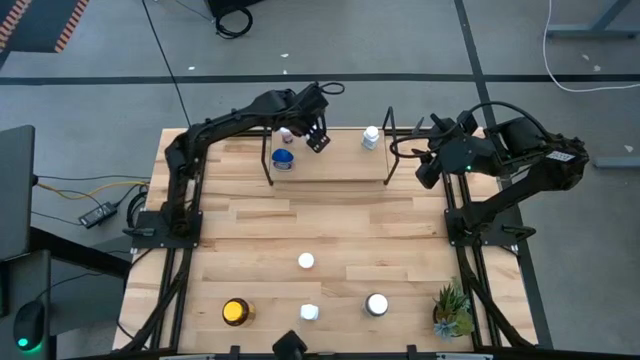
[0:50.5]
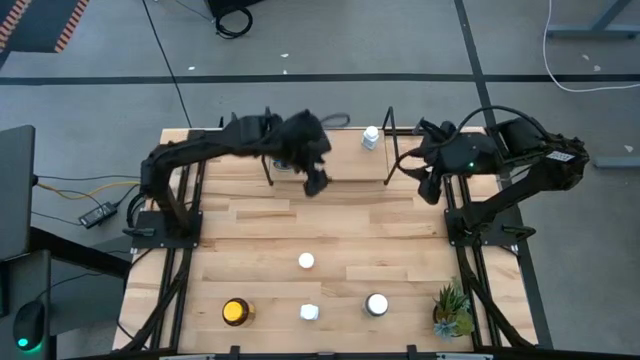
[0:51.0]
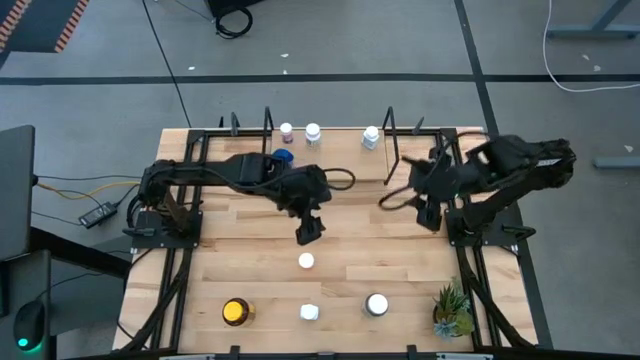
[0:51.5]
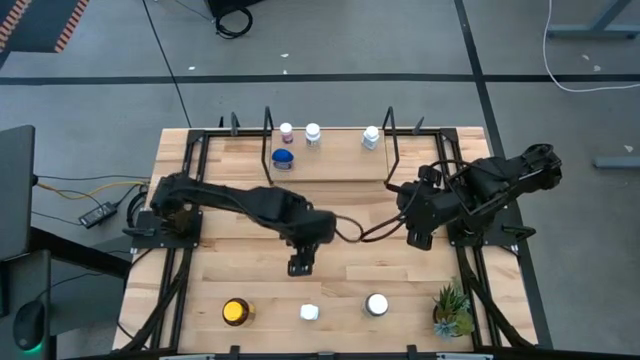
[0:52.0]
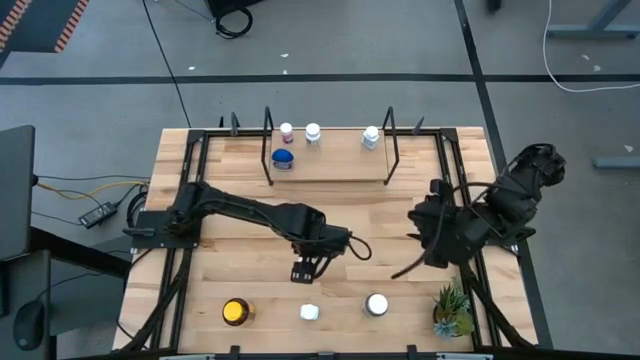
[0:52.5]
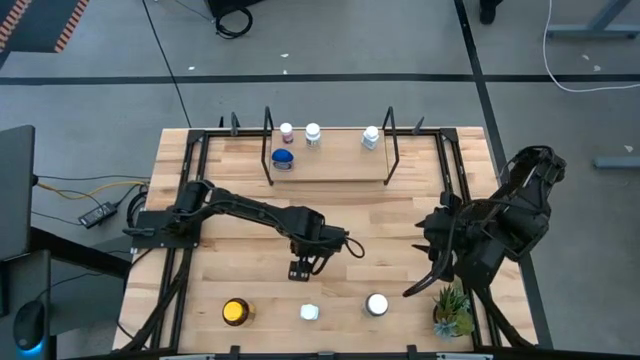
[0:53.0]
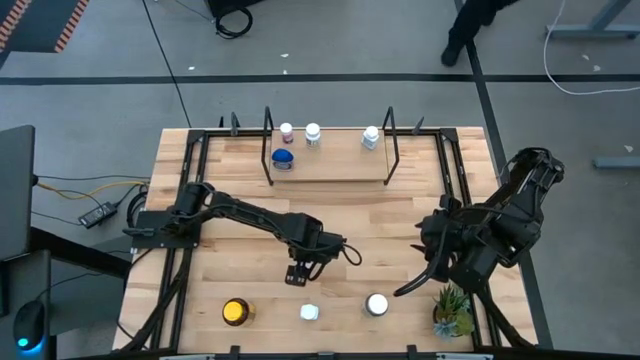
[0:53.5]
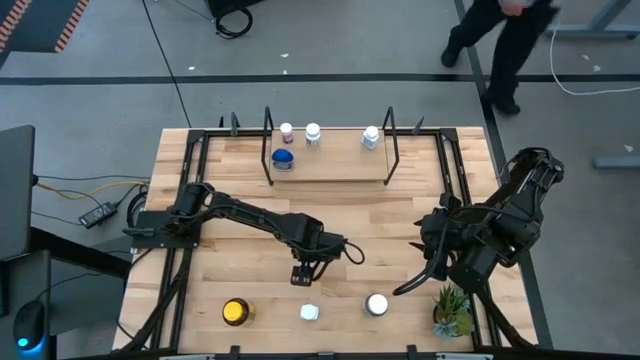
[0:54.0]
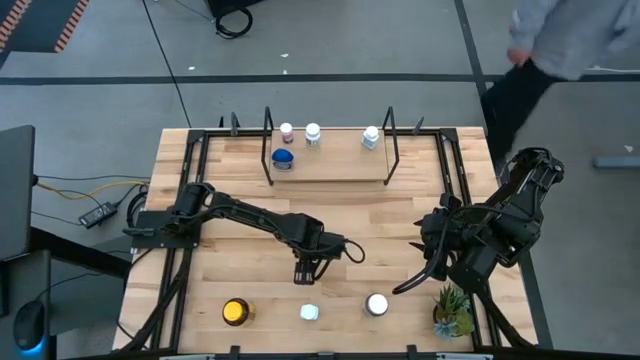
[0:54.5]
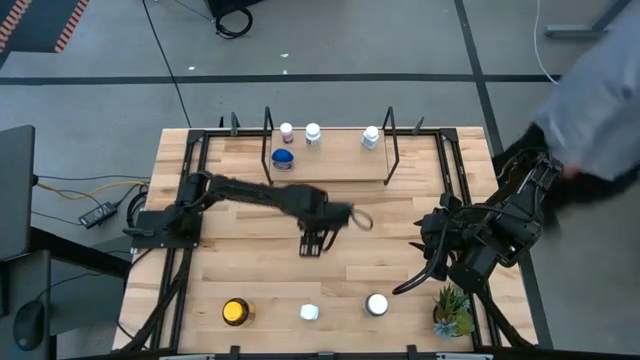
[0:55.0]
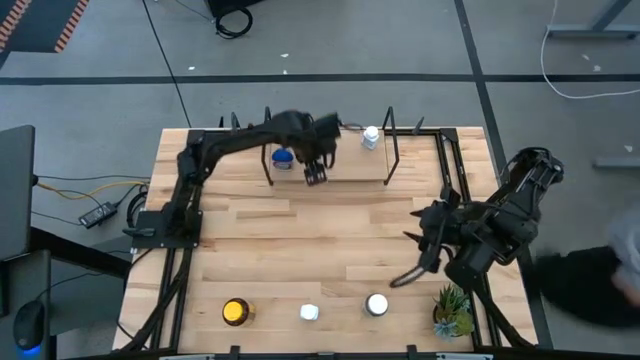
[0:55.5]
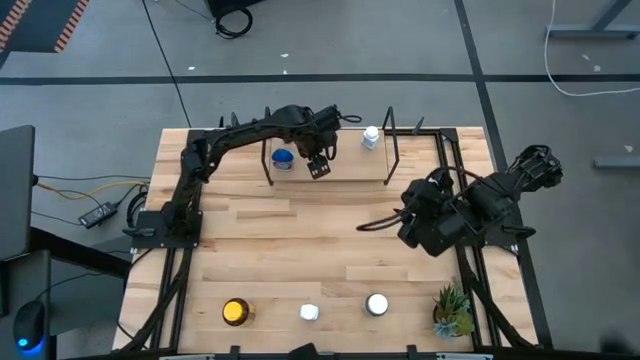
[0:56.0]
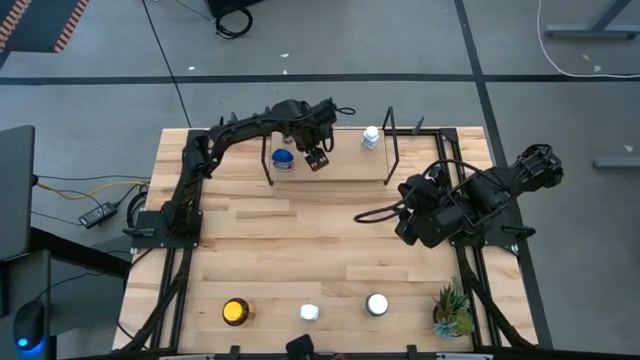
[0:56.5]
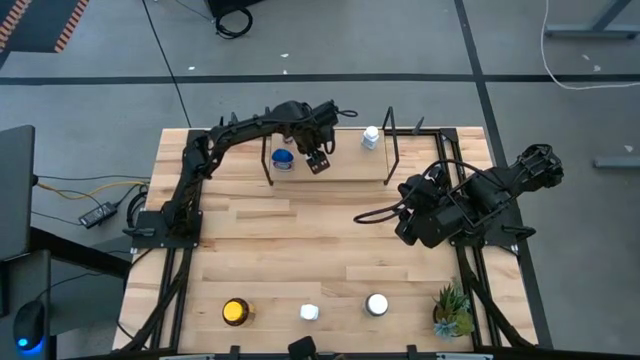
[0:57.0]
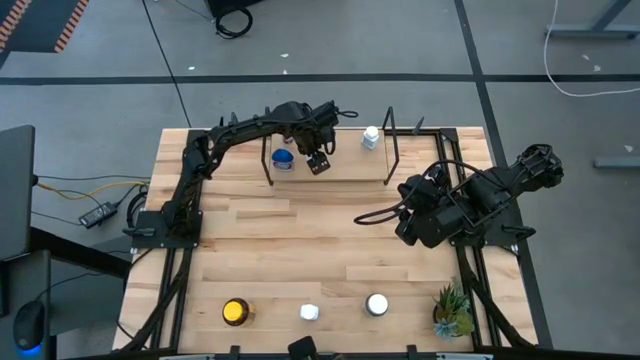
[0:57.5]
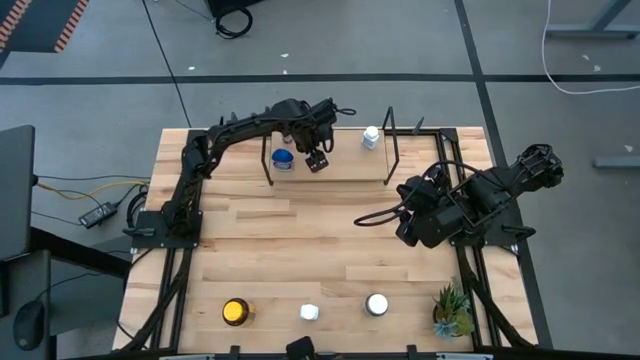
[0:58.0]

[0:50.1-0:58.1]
Task: Pick and place medicine bottles onto shelf by color
Put the orange pill bottle on the shelf

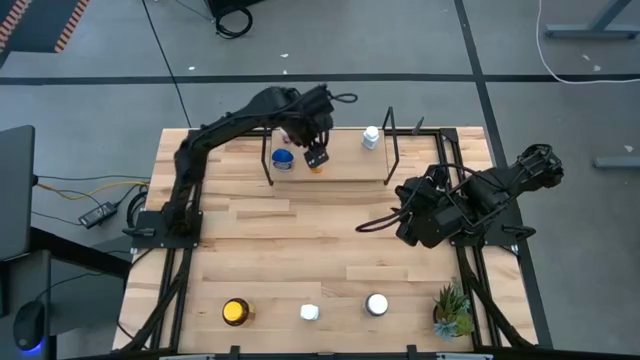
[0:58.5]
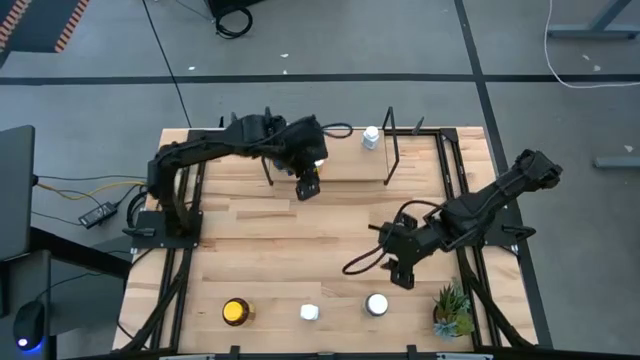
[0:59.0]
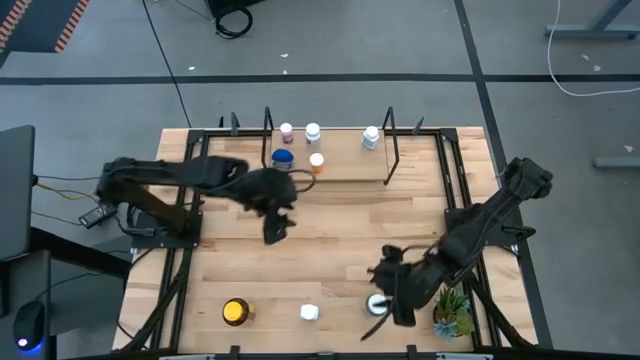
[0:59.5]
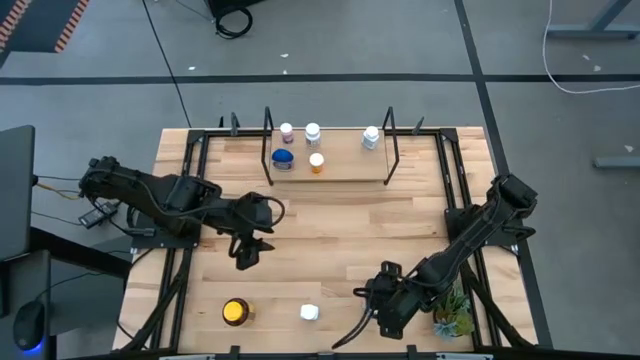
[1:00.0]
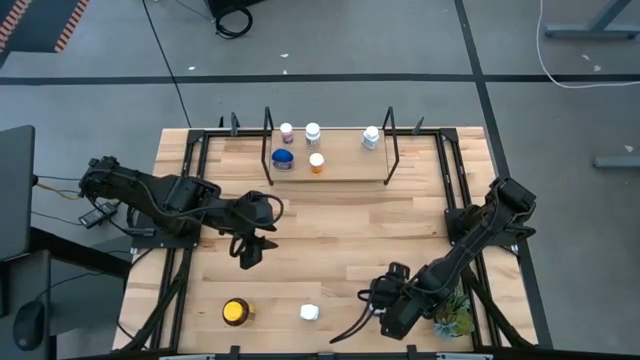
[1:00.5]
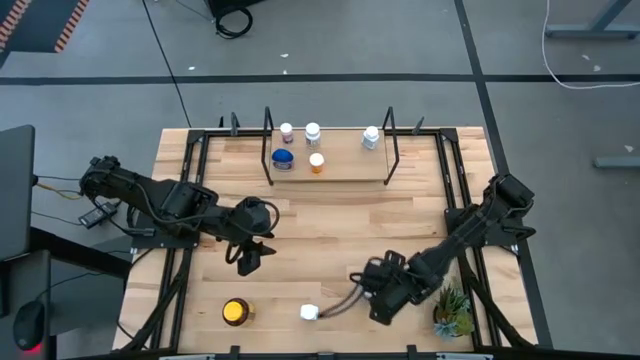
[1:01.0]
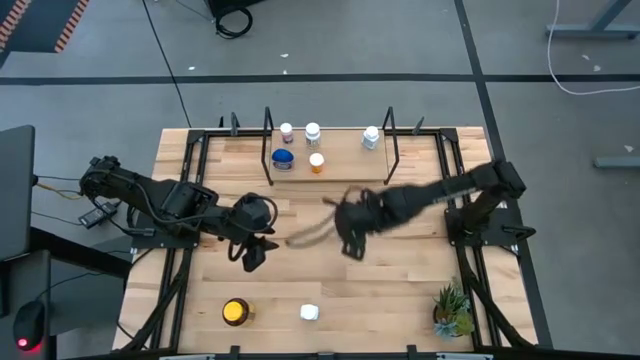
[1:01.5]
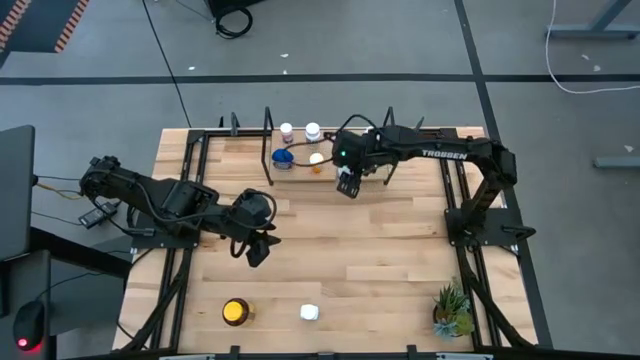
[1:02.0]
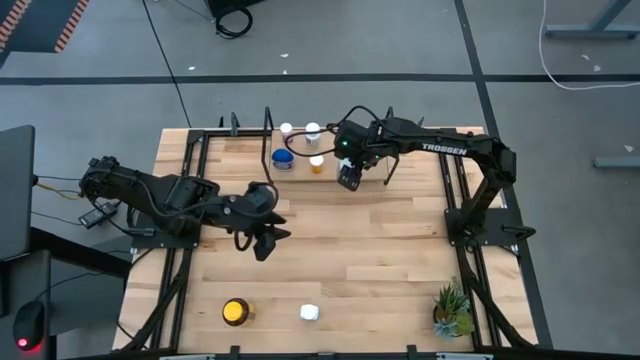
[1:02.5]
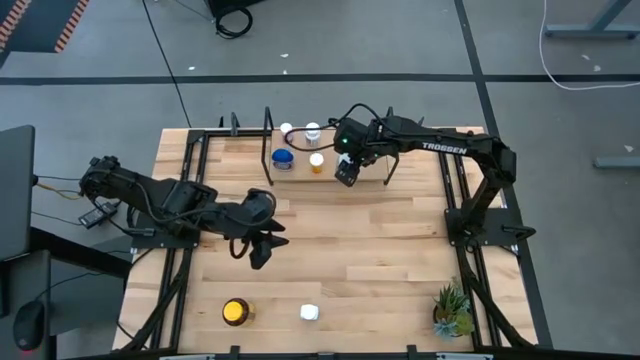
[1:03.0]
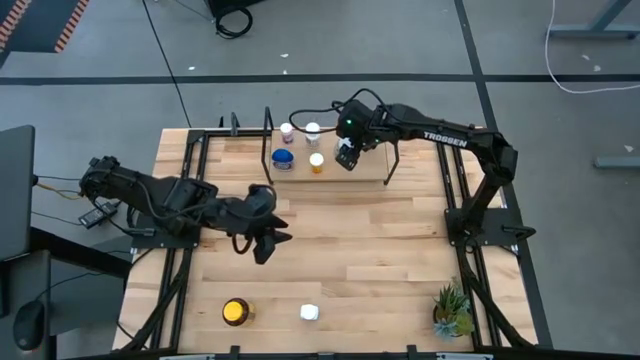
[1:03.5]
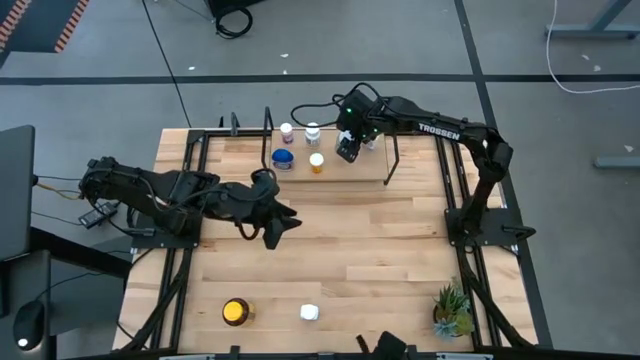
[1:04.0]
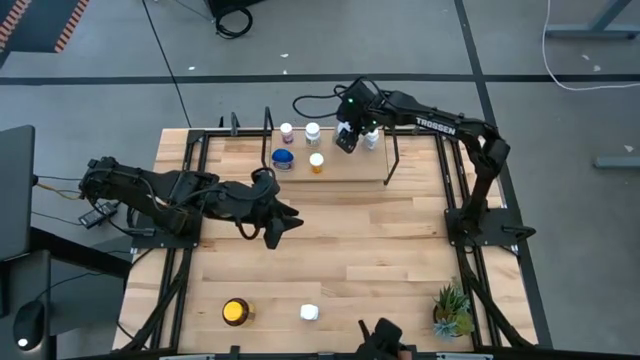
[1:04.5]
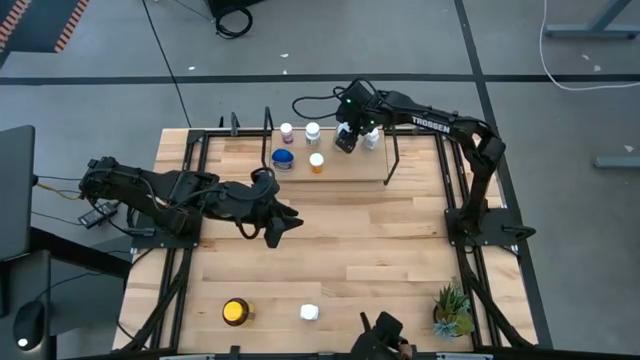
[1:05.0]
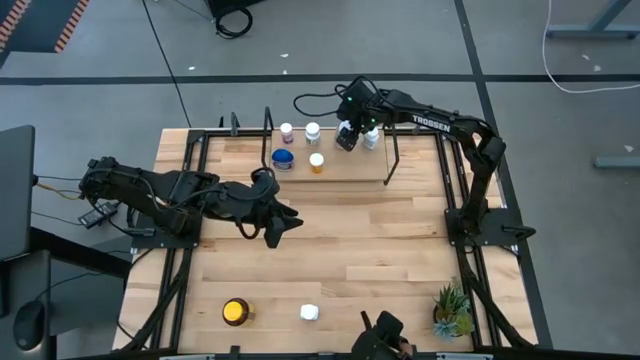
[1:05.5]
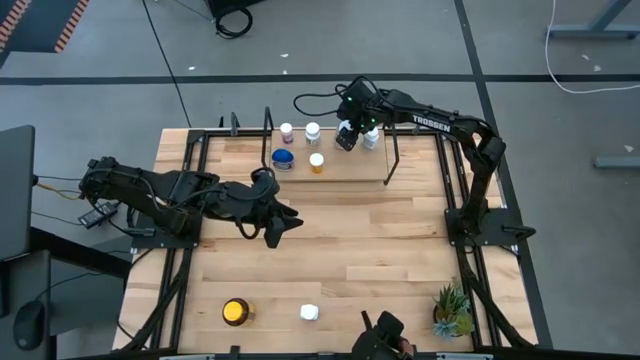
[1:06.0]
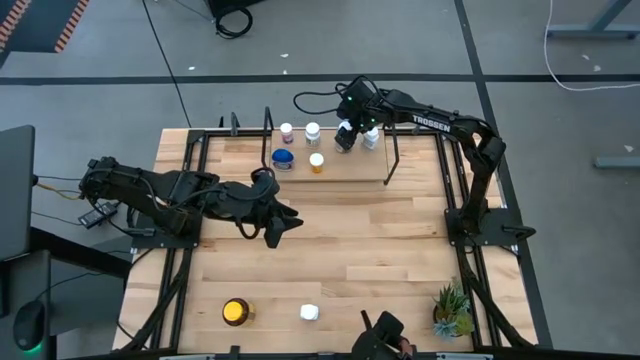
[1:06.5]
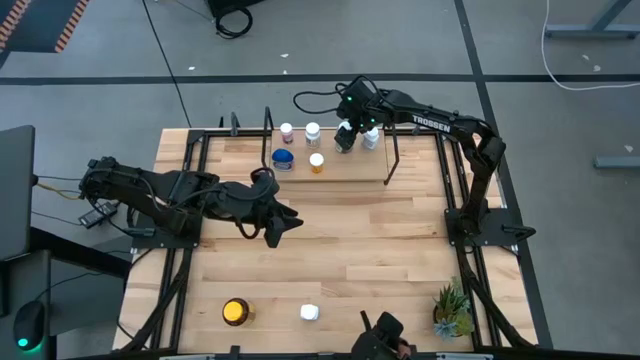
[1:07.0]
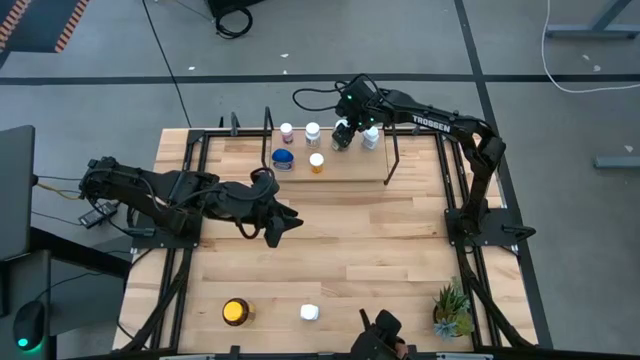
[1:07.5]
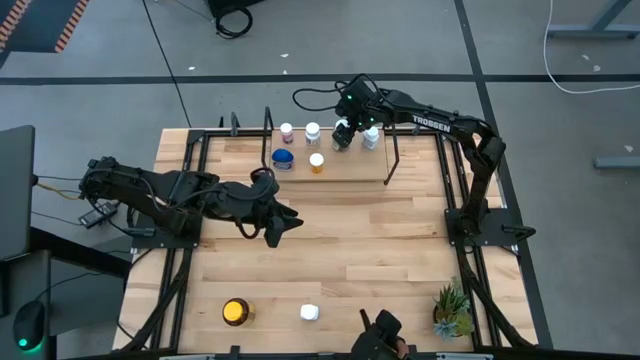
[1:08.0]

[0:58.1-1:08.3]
Put the green pill bottle on the shelf

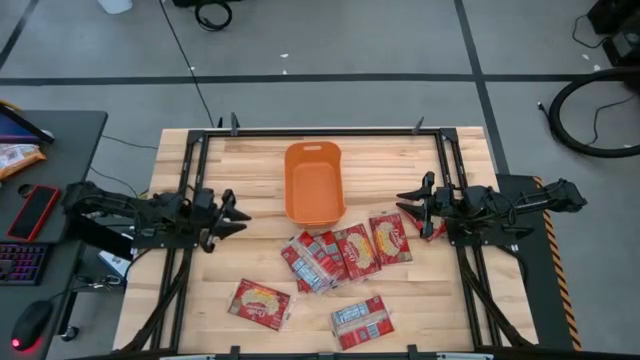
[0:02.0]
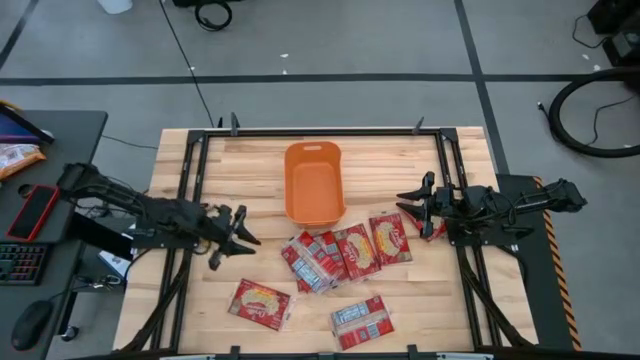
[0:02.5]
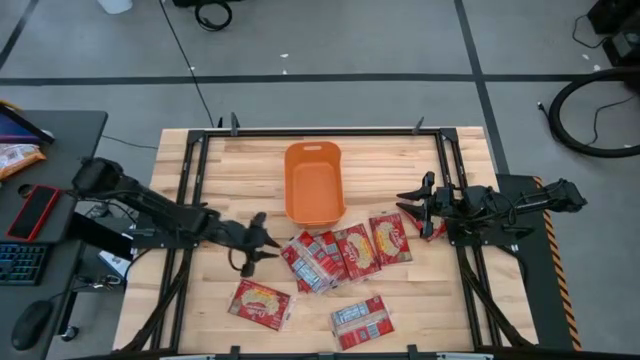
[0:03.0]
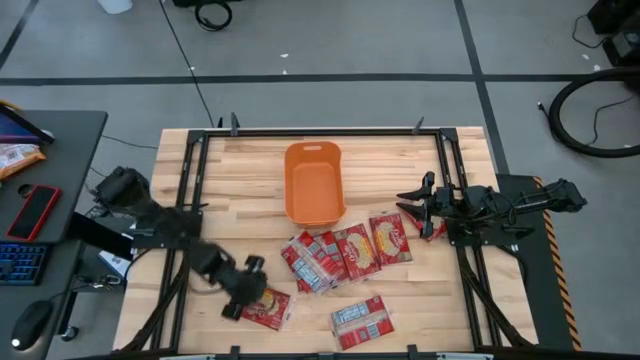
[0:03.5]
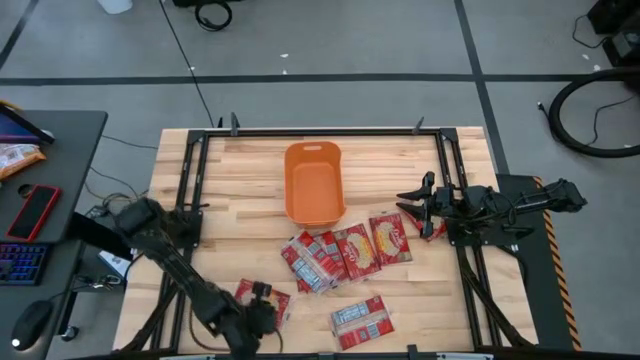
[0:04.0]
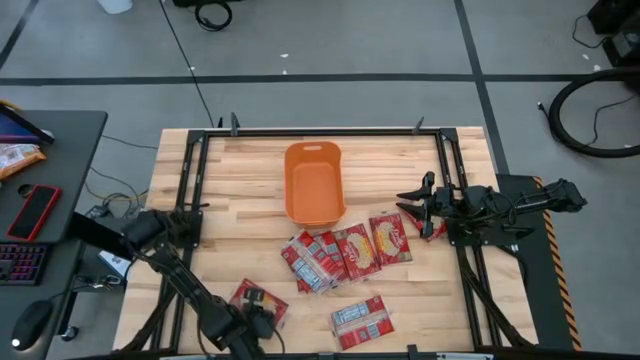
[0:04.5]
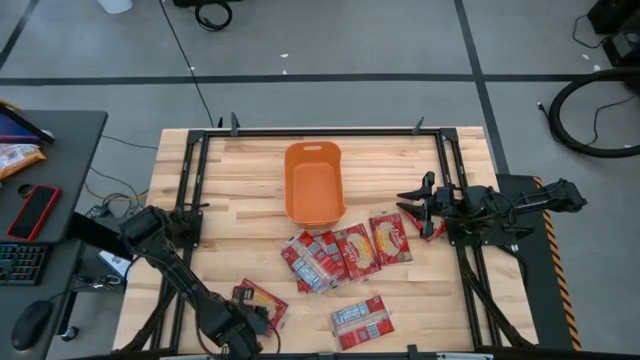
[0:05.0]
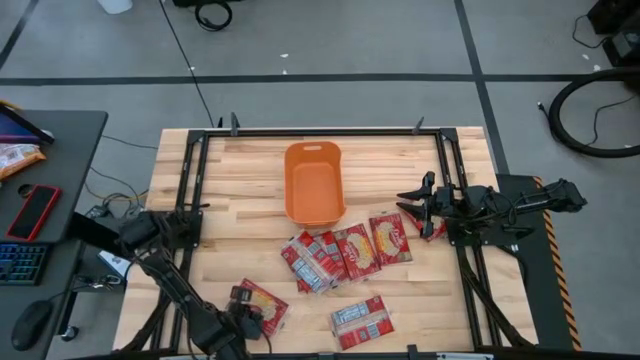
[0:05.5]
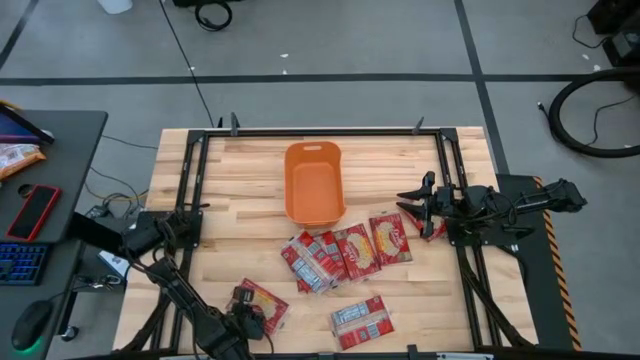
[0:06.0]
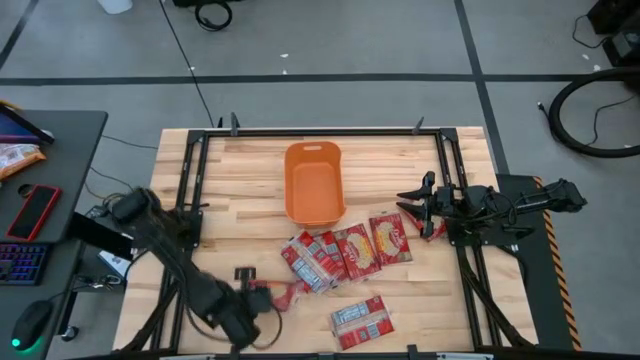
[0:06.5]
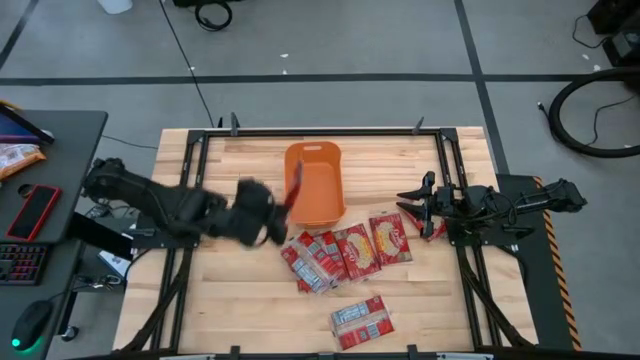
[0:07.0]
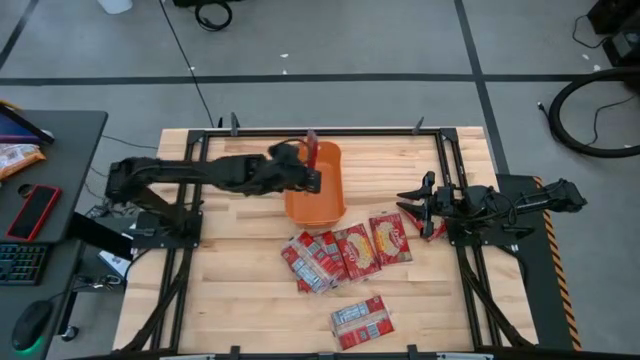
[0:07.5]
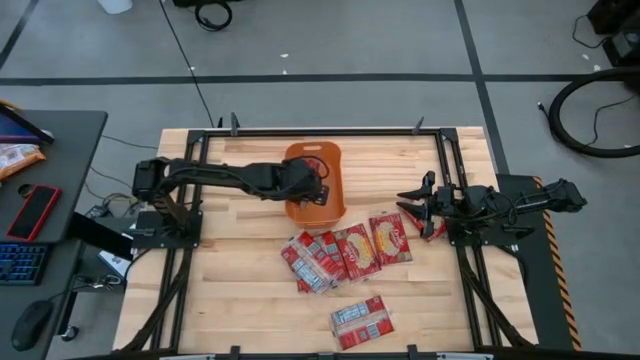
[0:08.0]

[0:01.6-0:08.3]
Task: Sort popcorn bags into baskets
Put the popcorn bag into the orange bin
